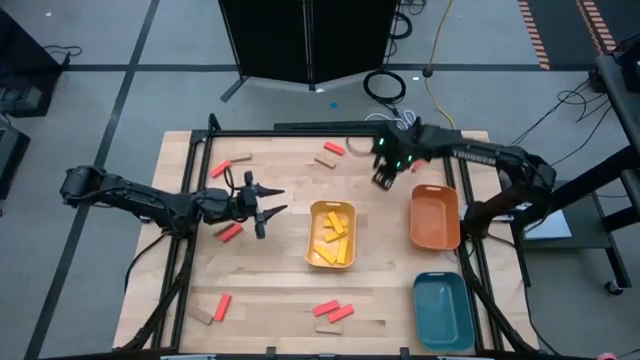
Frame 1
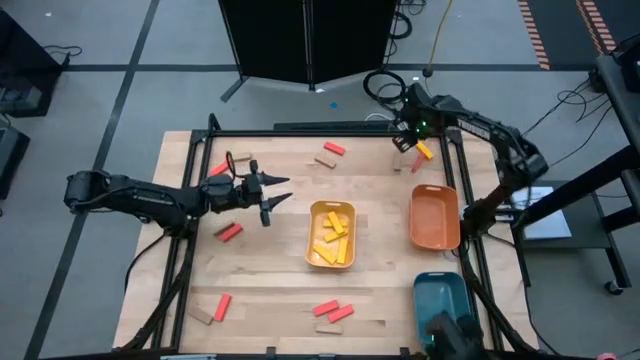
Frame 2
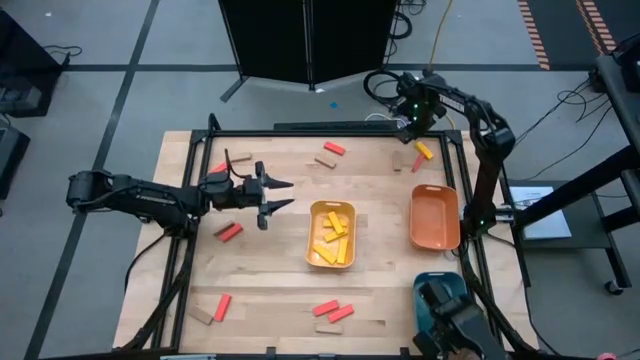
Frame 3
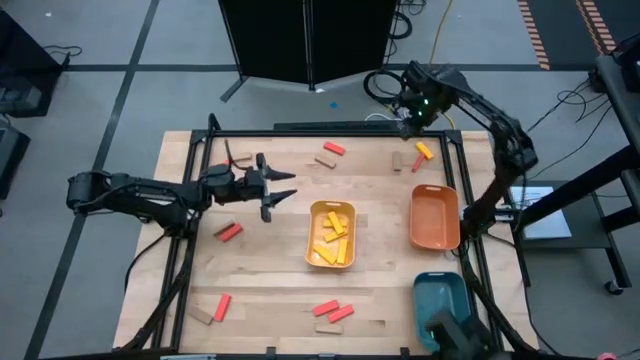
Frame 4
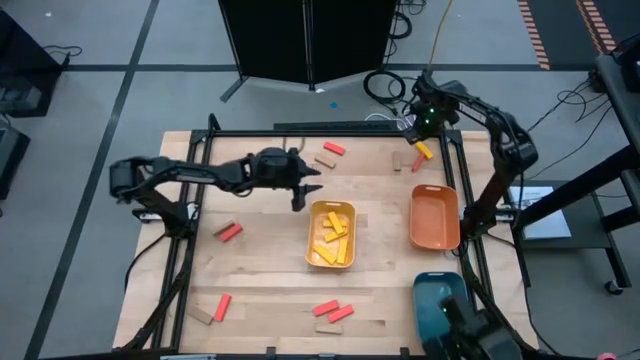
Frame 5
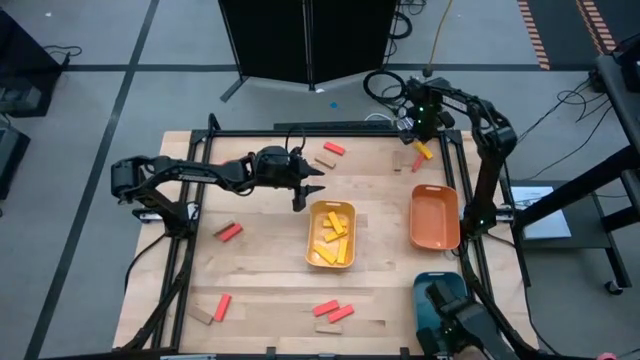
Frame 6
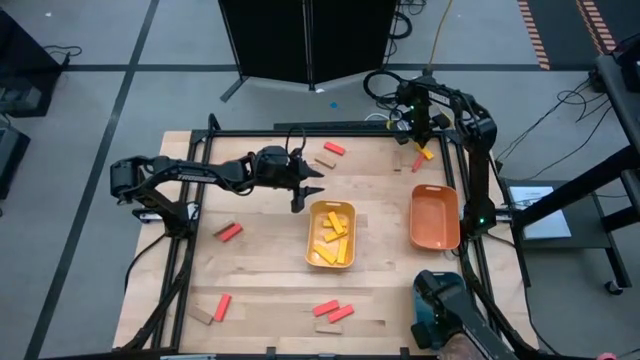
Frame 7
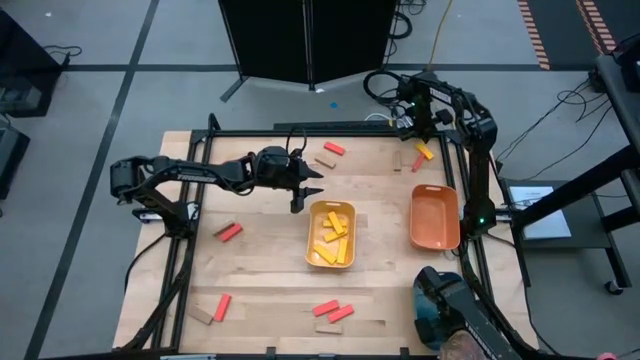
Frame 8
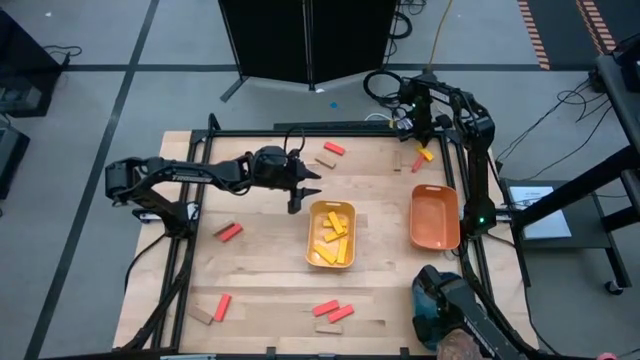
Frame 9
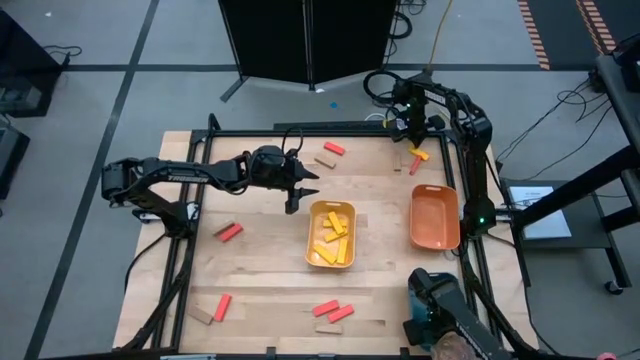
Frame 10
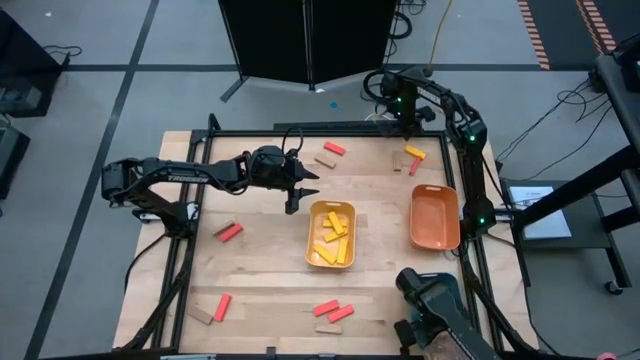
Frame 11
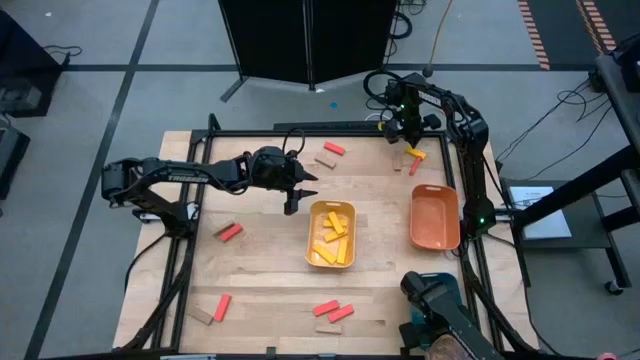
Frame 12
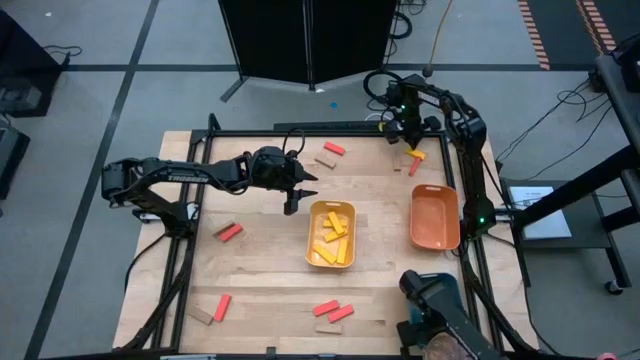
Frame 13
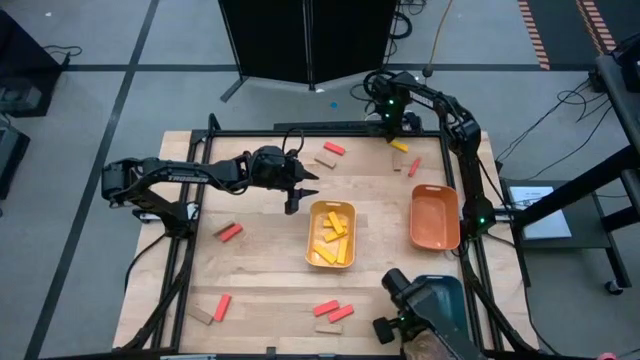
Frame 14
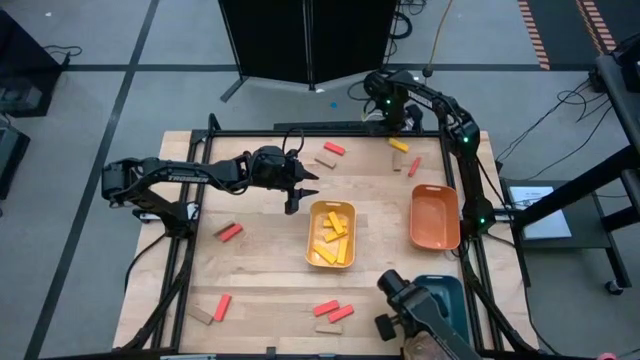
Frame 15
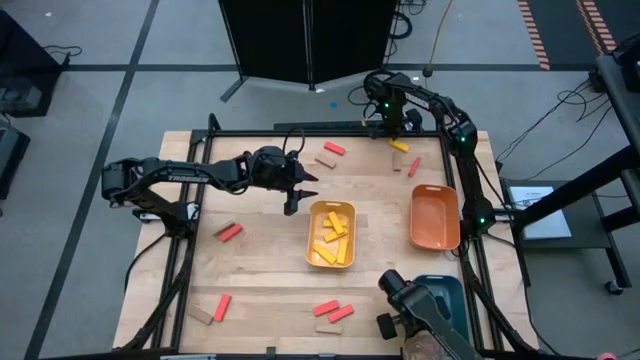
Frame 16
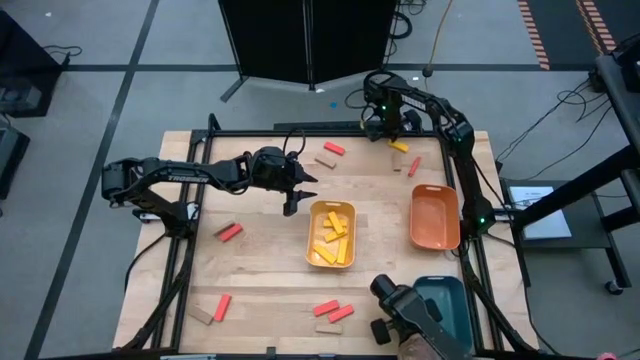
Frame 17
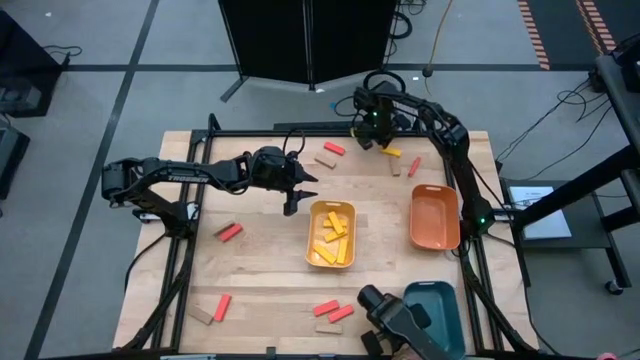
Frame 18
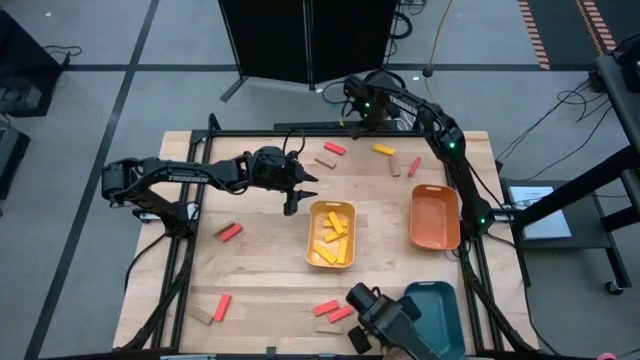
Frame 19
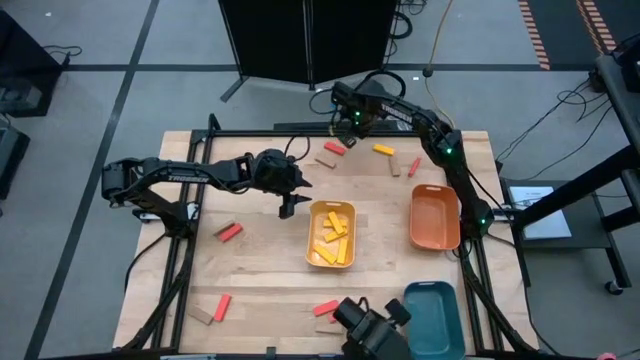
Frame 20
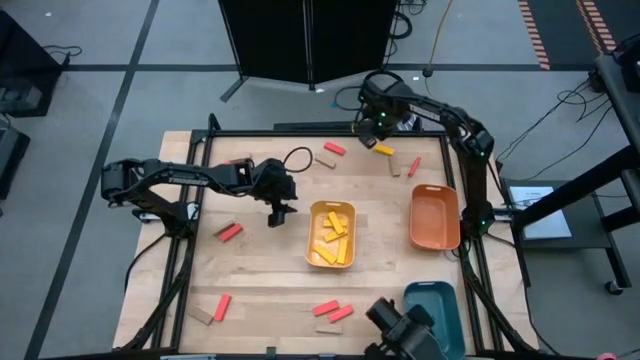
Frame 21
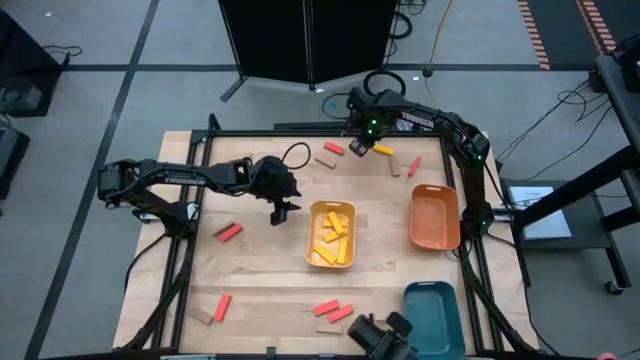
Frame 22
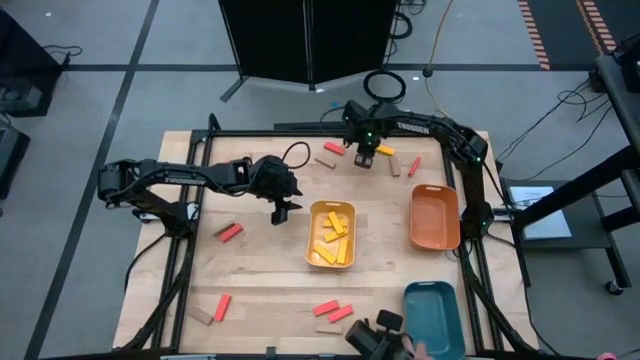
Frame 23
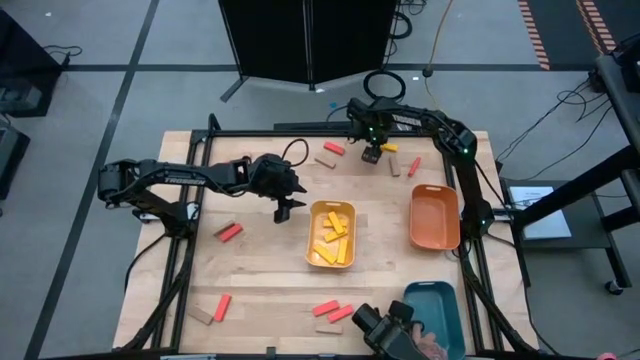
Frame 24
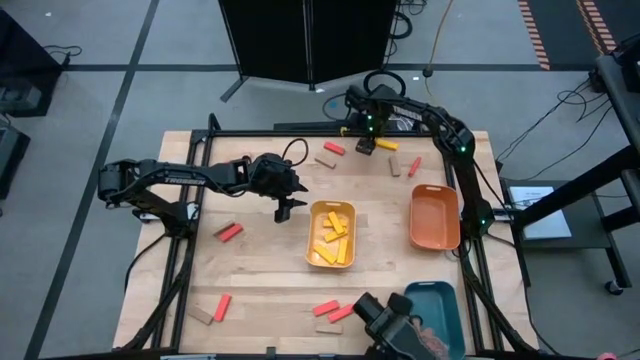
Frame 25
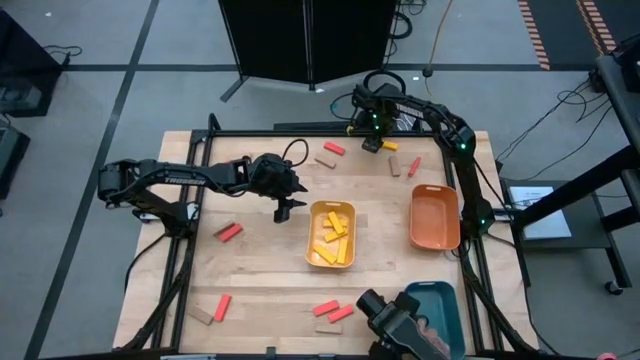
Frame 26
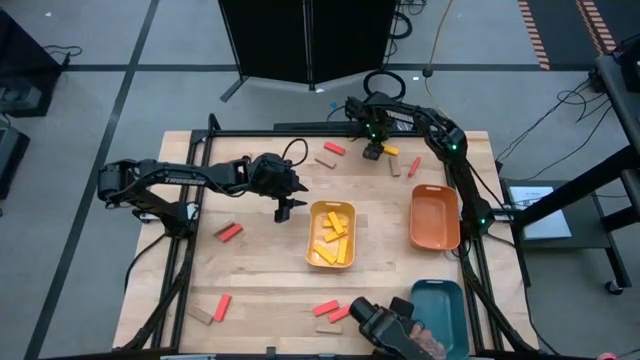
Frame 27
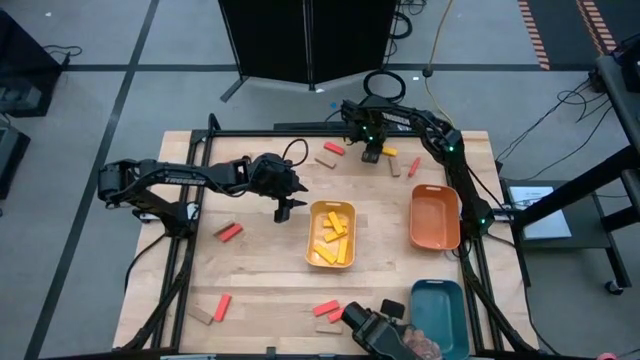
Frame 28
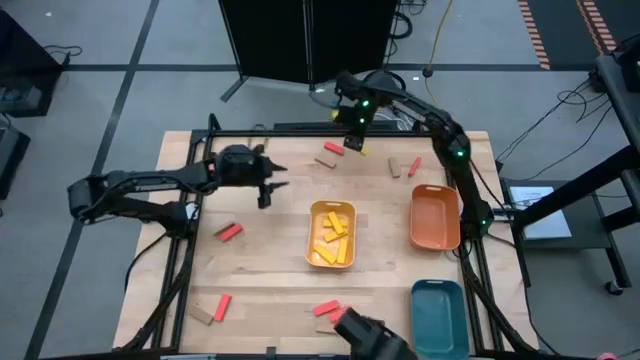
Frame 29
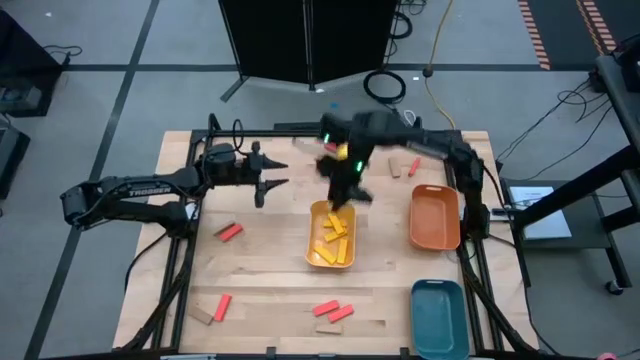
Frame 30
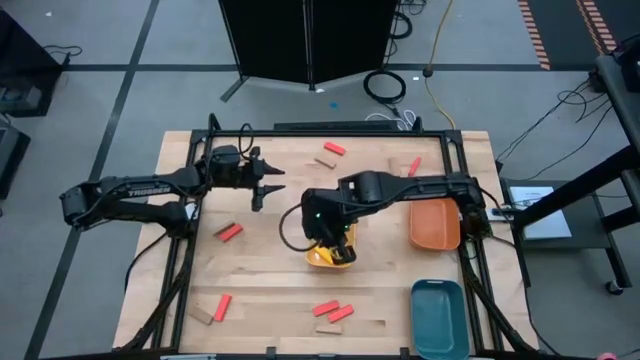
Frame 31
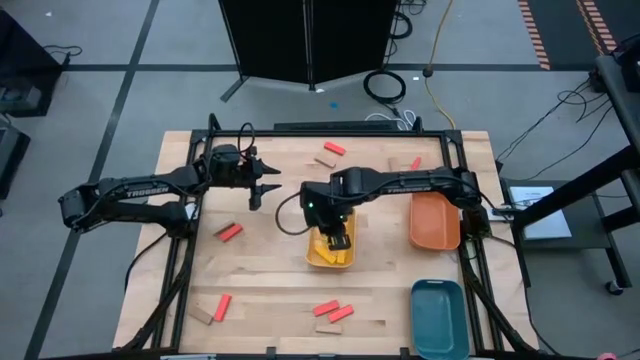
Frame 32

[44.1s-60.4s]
Task: Sort blocks
Put the yellow wooden block into the yellow bin

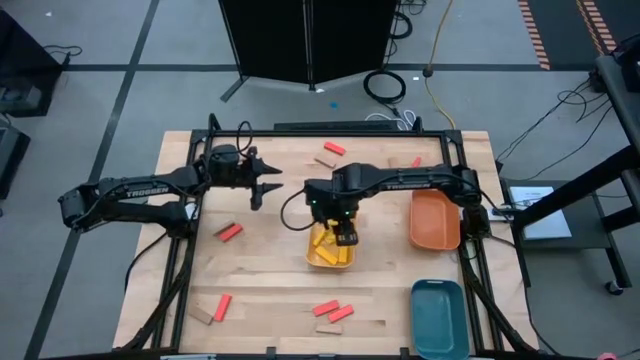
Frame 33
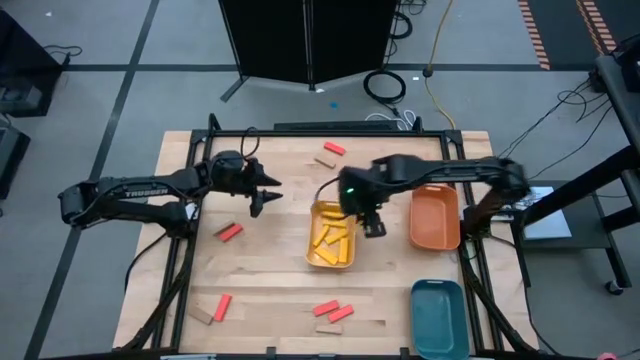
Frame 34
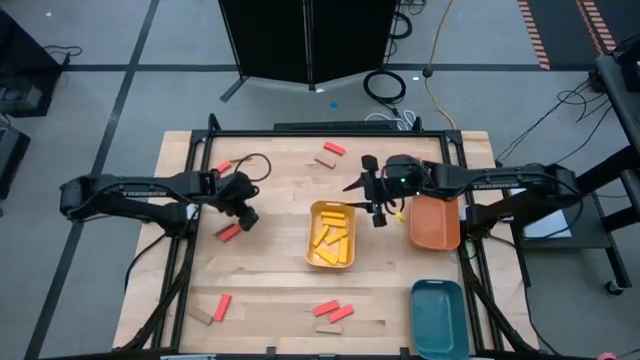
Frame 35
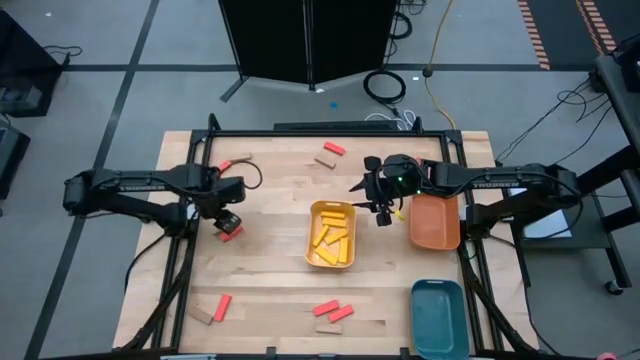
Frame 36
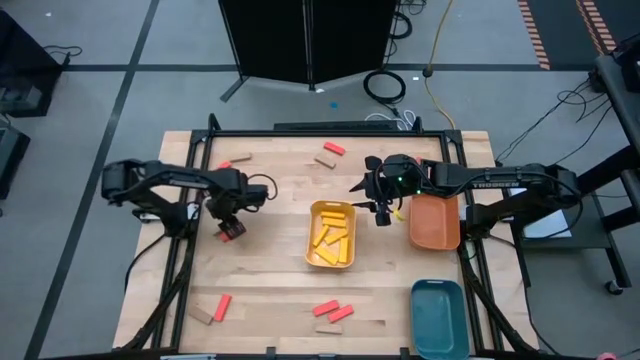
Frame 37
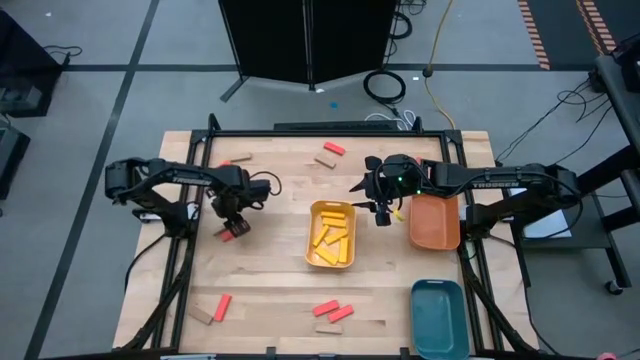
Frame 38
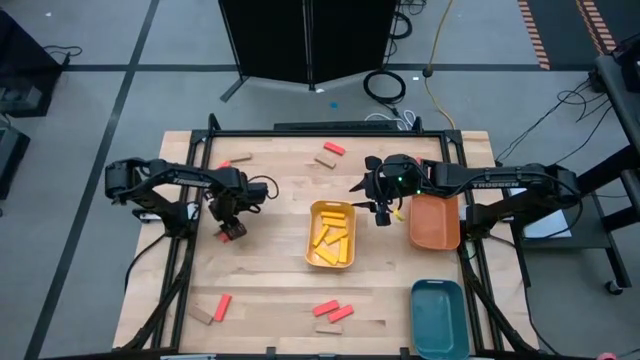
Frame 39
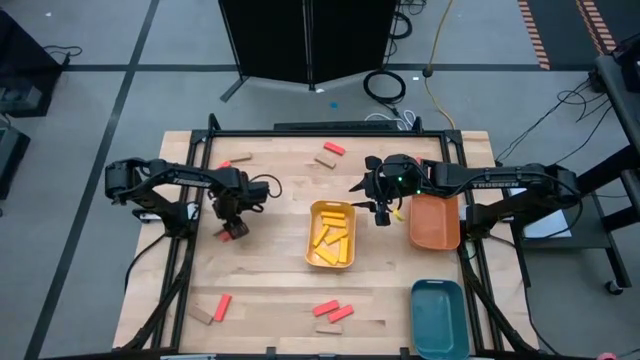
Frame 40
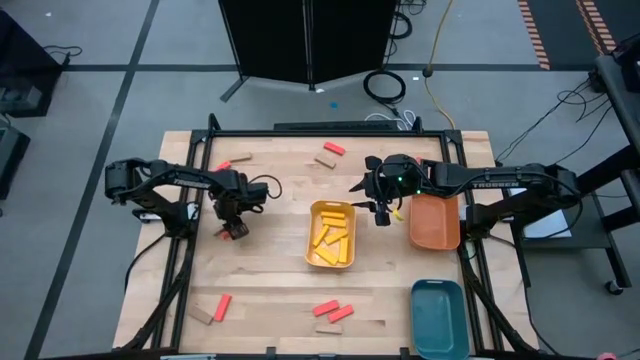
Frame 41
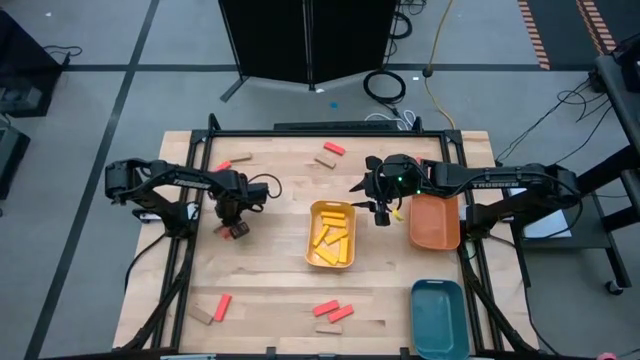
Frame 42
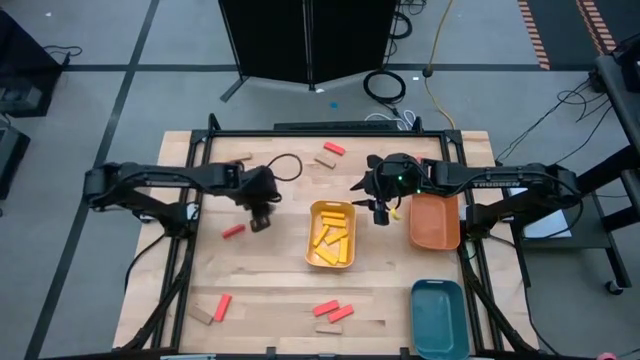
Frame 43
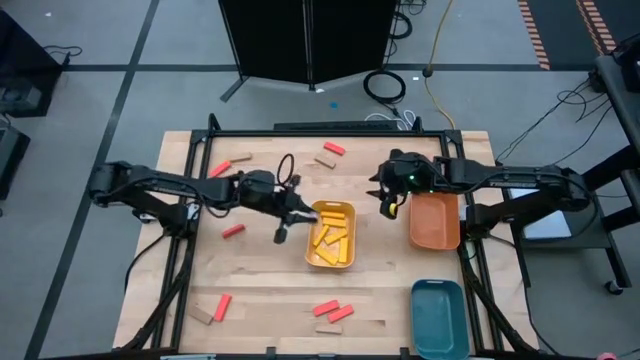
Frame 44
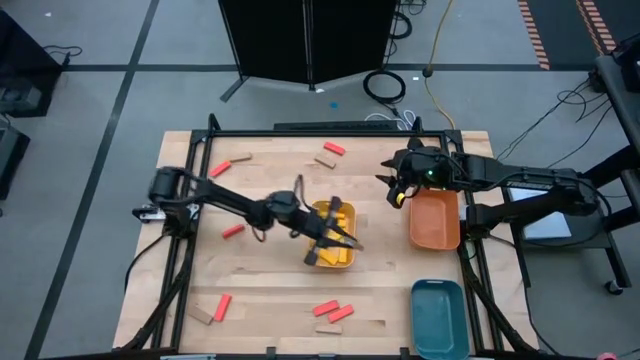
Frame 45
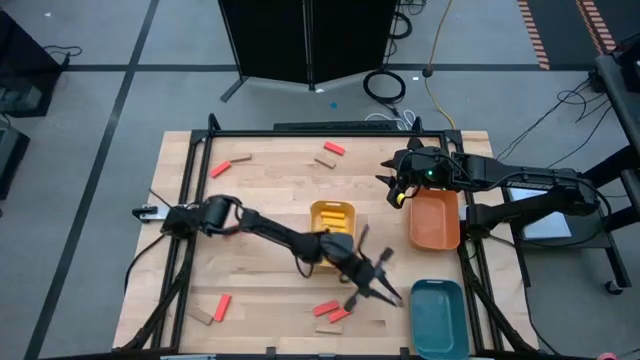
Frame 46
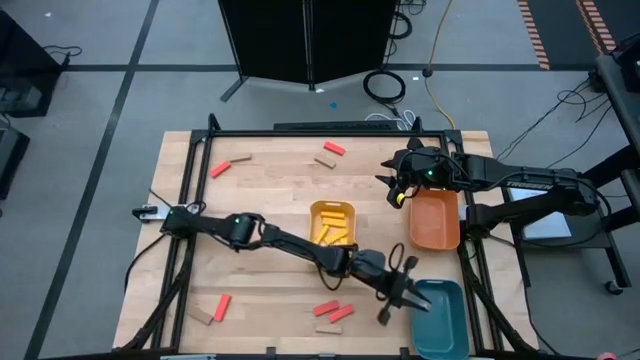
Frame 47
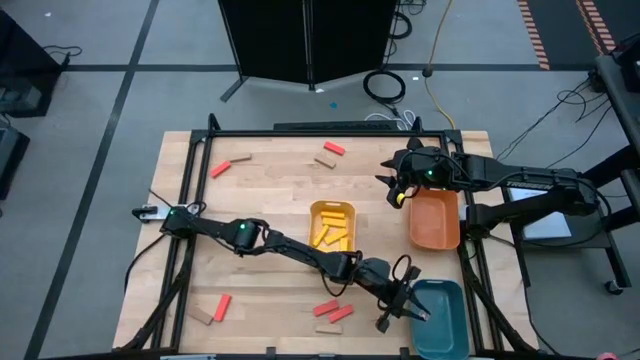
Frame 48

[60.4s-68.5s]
Put the brown wooden block into the blue bin
